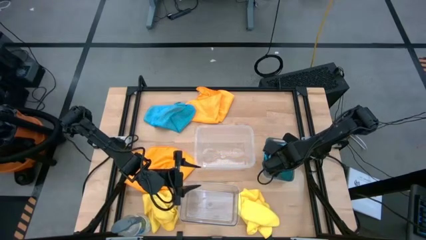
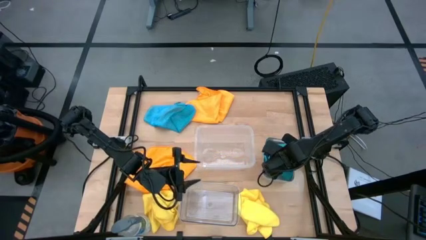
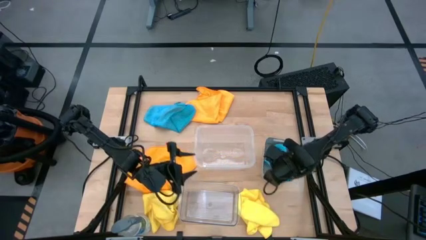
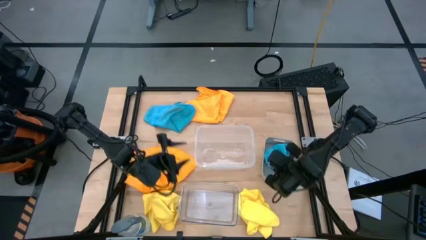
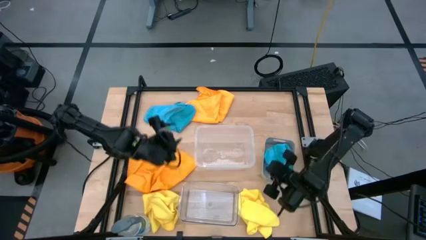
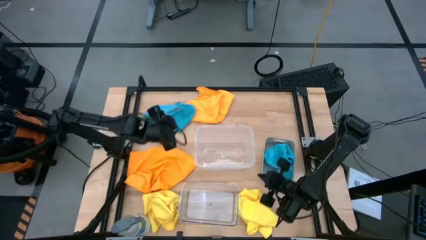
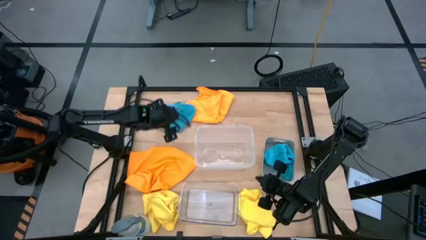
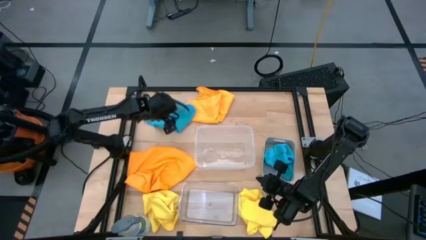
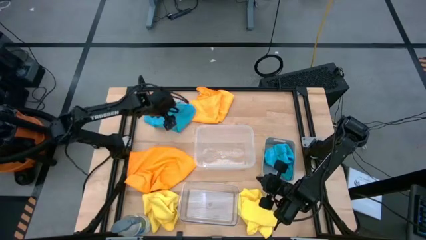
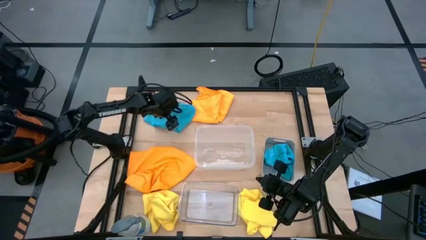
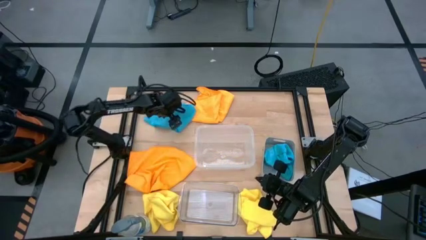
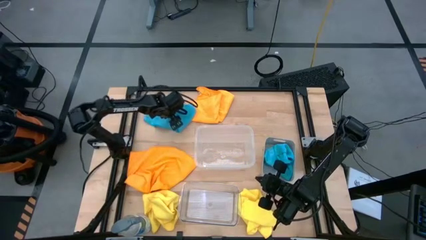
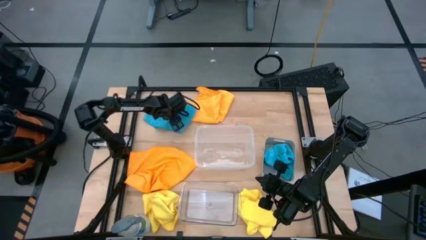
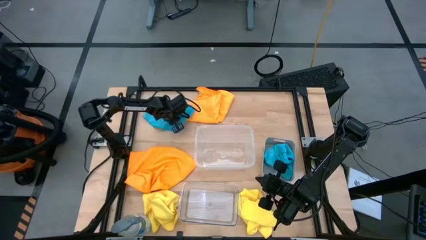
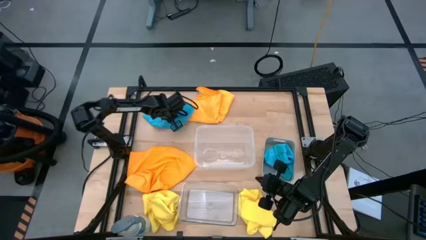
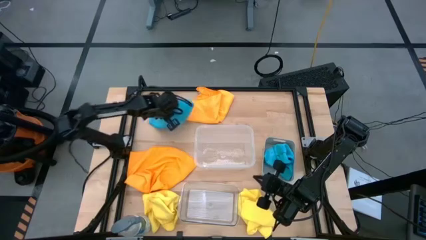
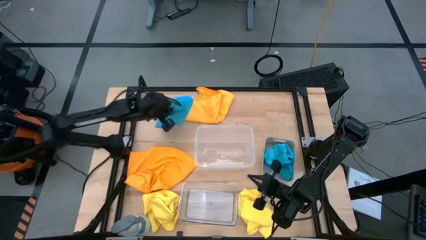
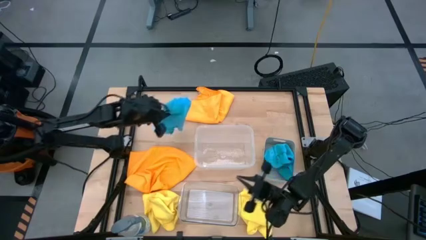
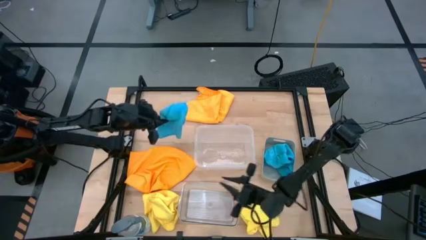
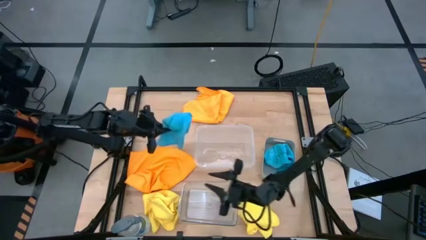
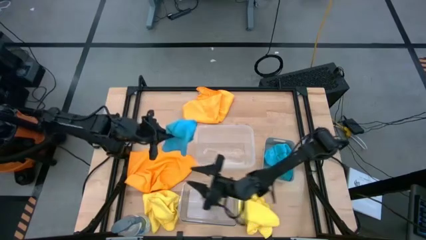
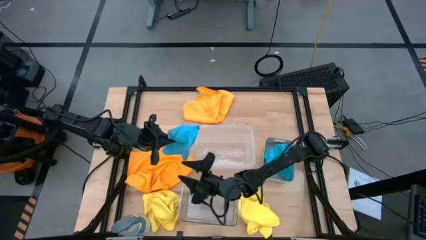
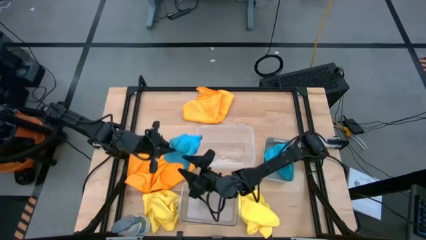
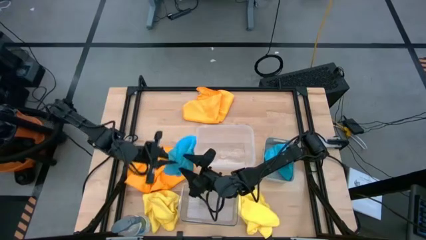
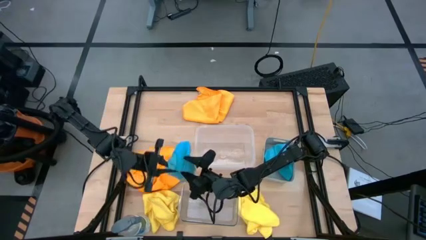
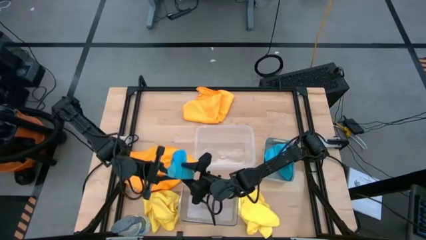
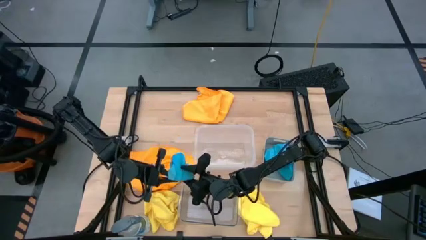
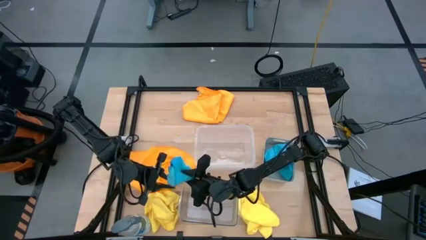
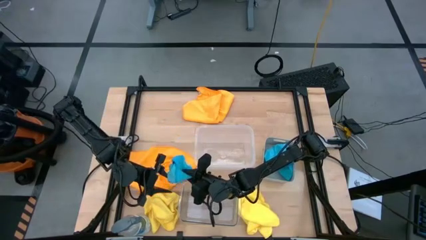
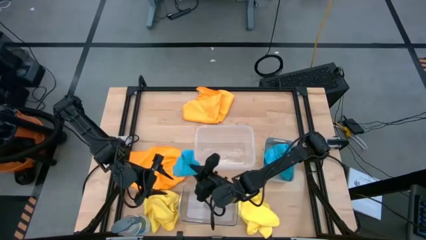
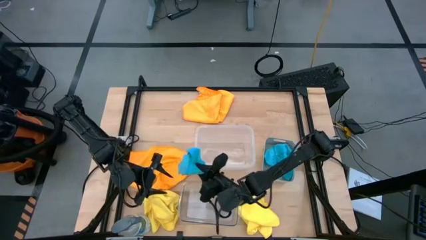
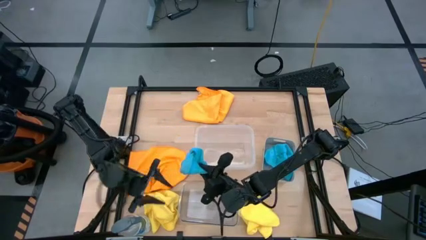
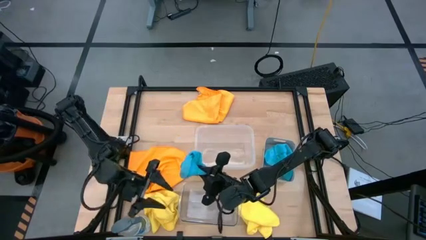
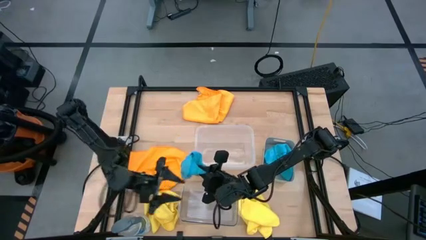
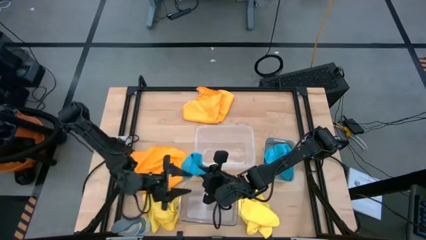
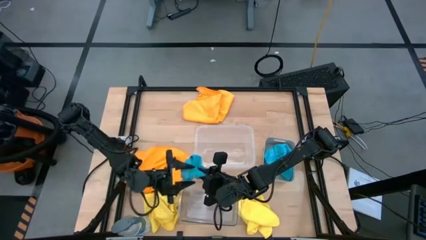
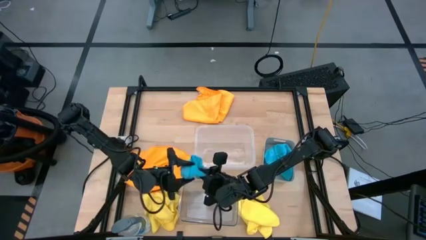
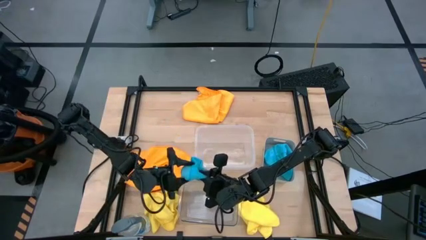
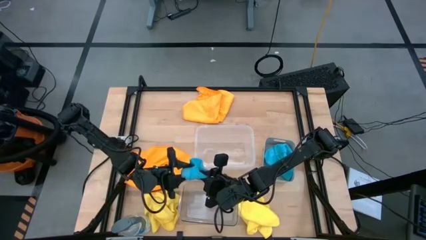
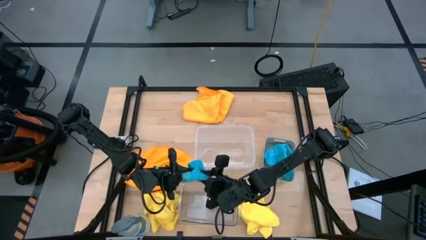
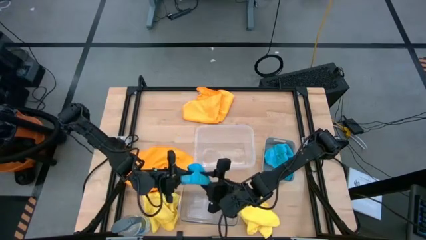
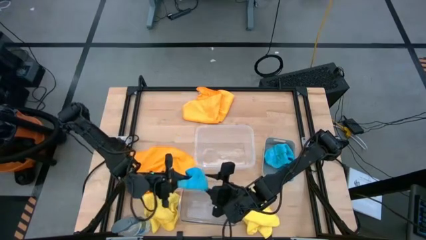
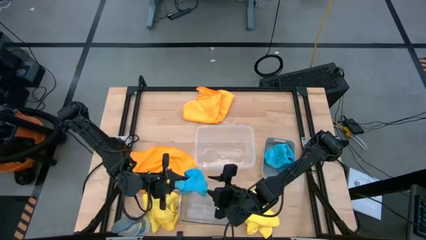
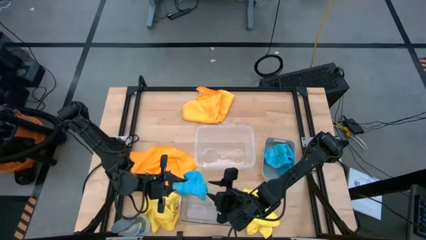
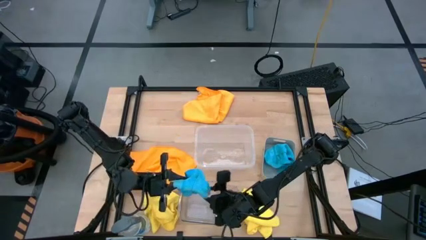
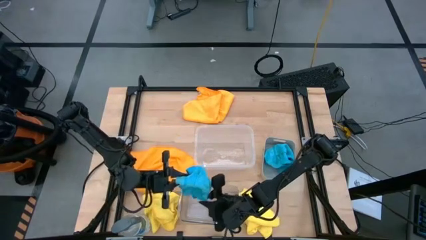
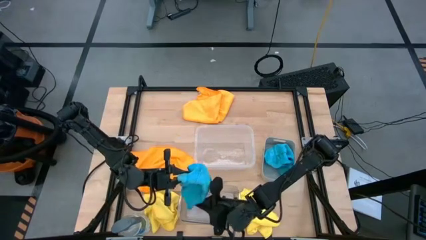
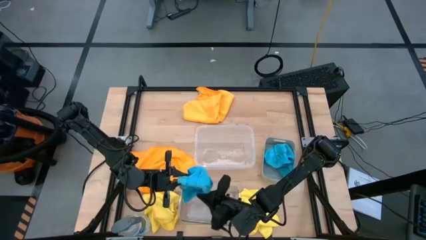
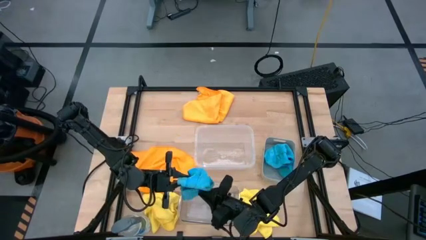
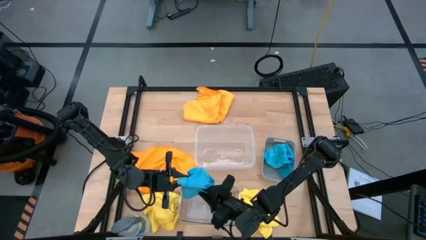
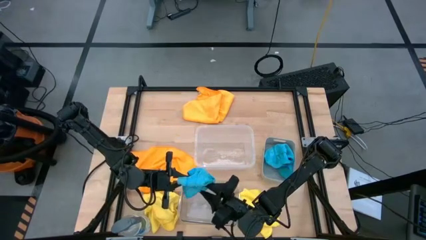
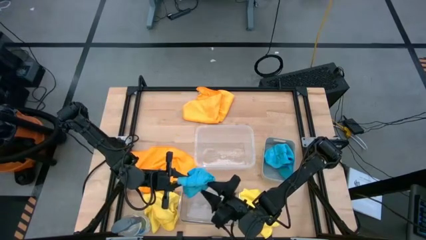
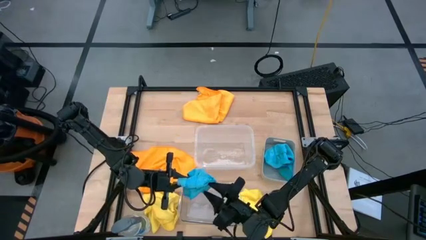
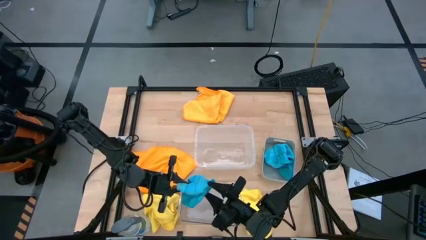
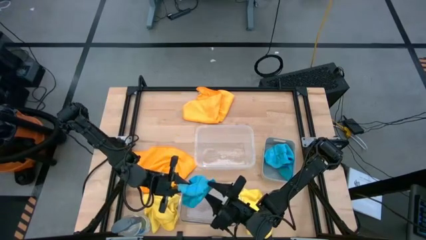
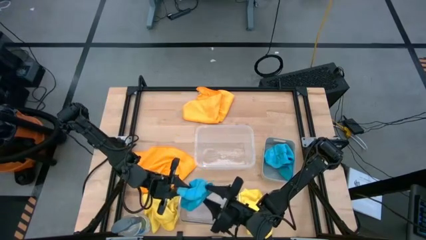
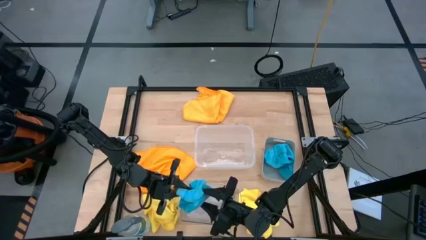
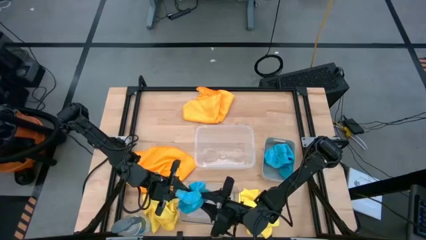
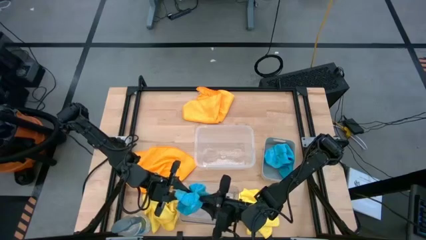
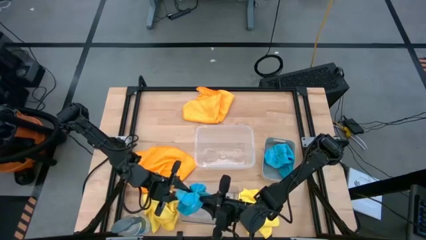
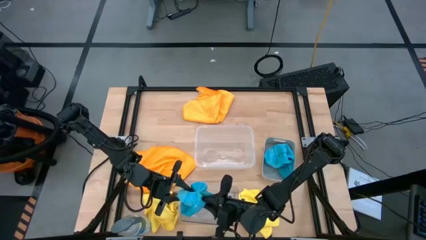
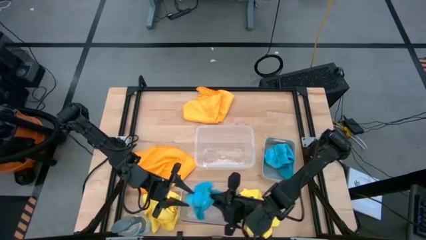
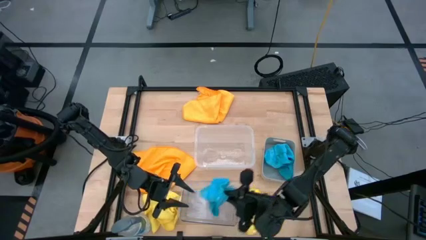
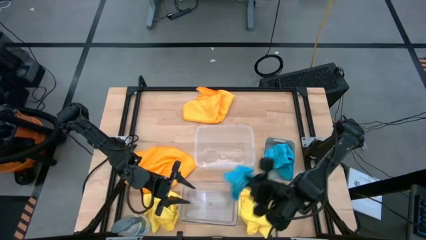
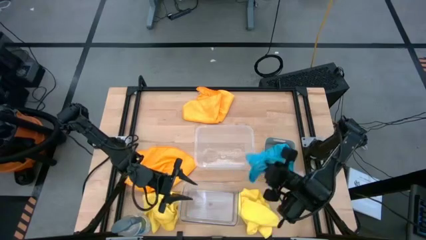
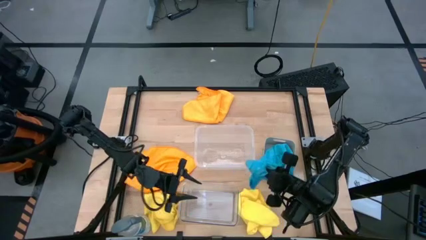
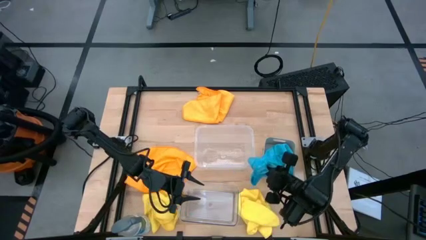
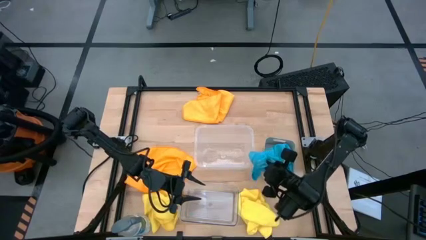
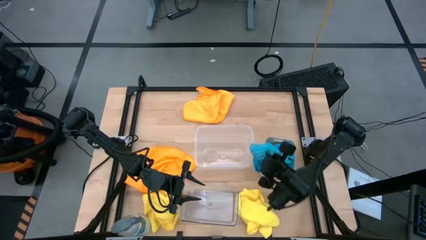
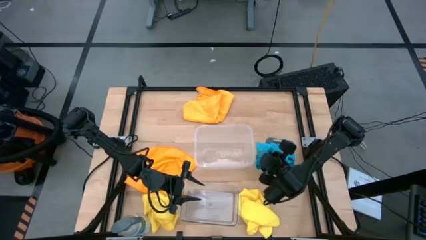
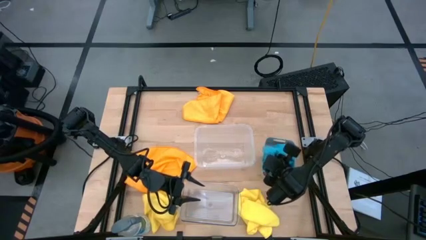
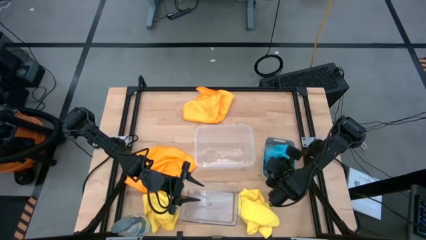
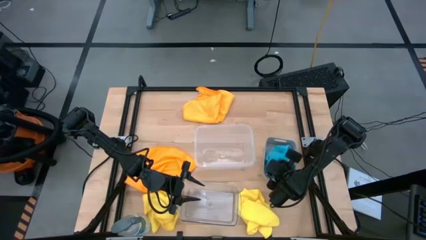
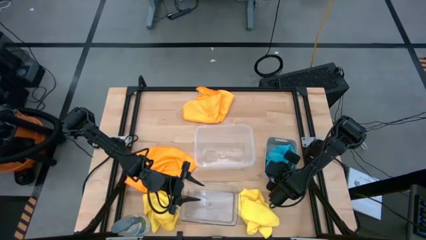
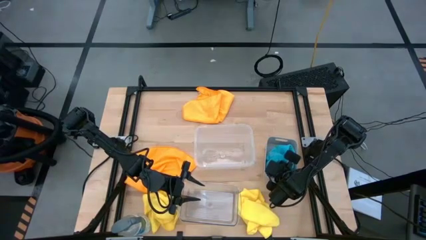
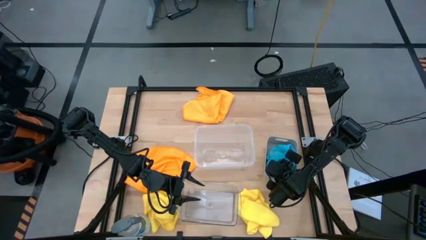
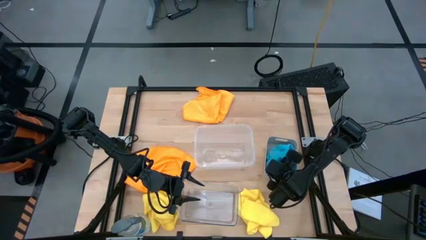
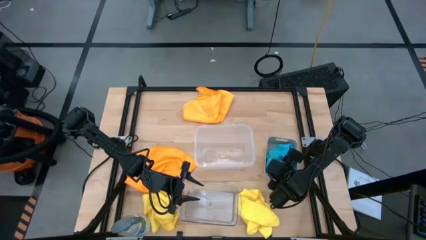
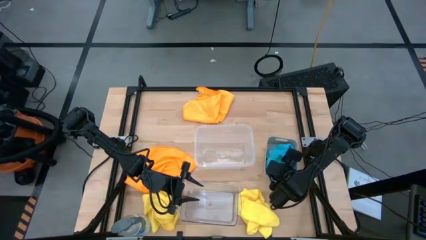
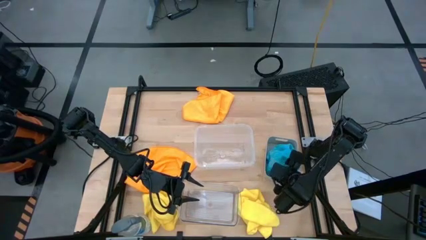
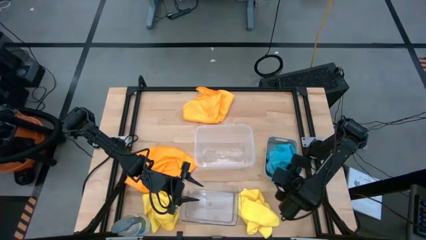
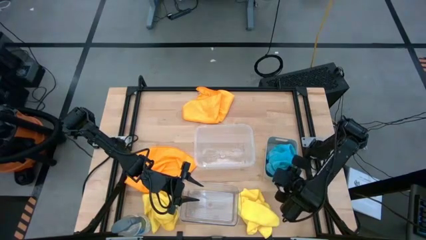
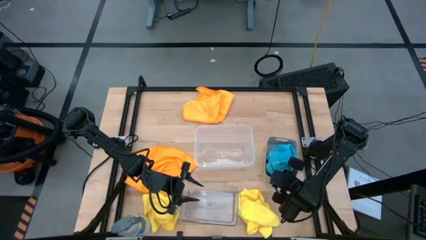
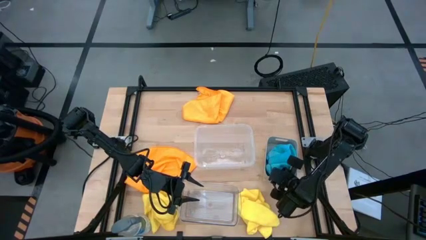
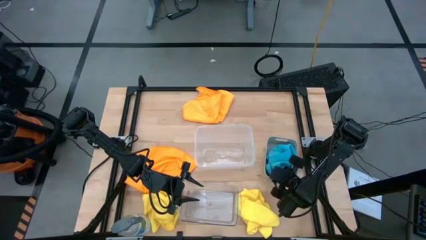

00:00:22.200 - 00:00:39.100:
Task: Sort microfiber towel by color & place in baskets
Put the blue microfiber cloth into the gray bin
